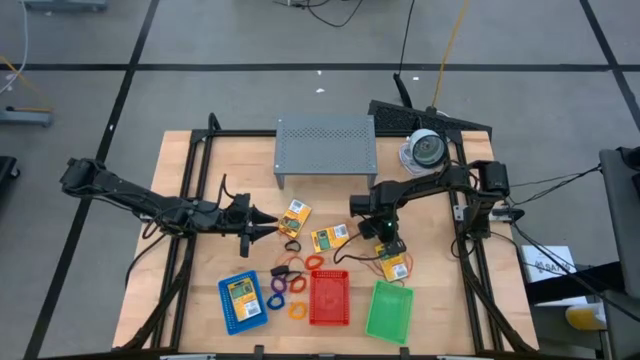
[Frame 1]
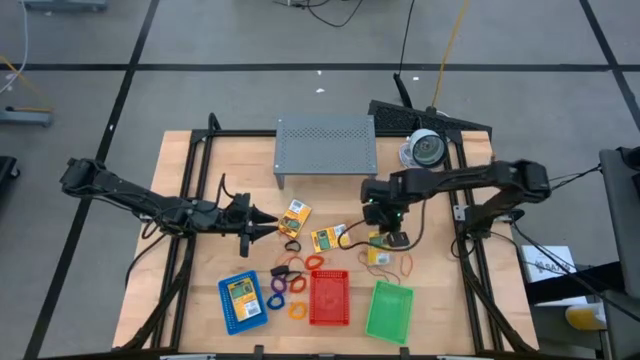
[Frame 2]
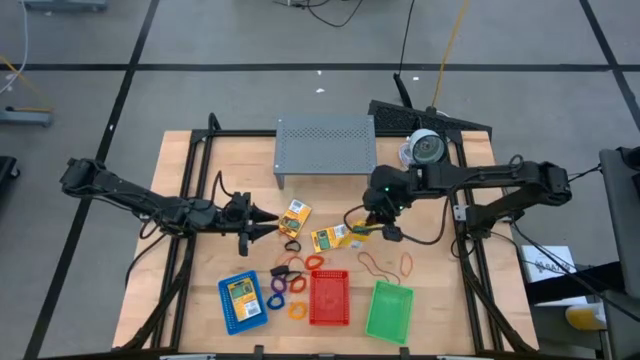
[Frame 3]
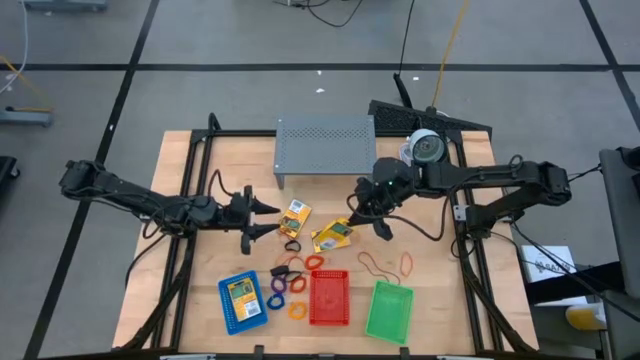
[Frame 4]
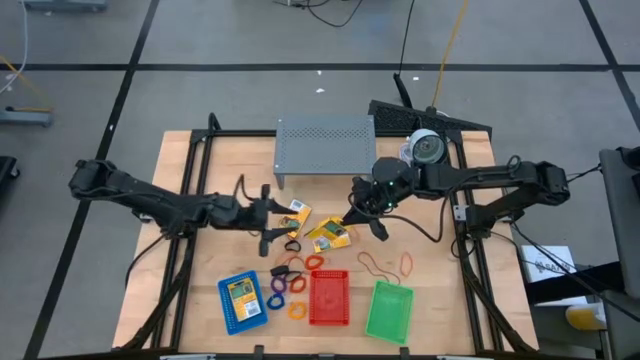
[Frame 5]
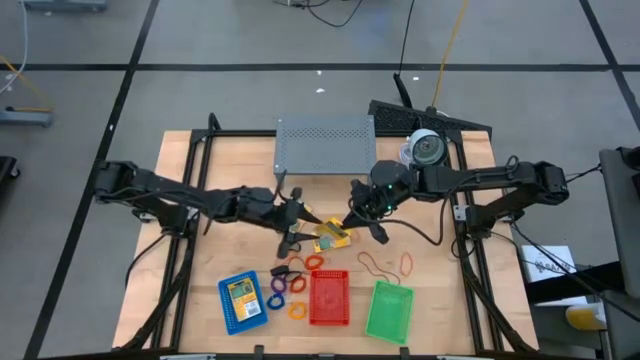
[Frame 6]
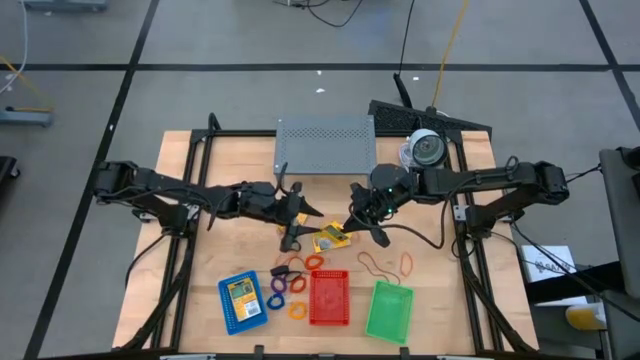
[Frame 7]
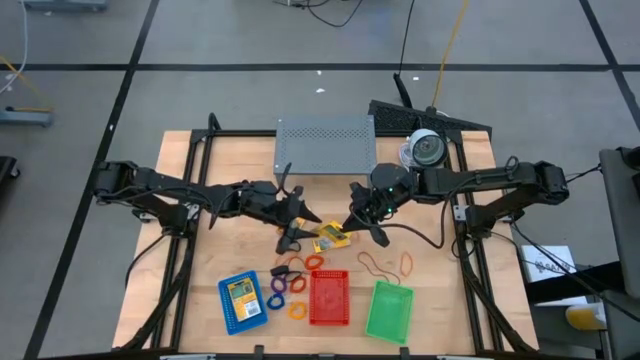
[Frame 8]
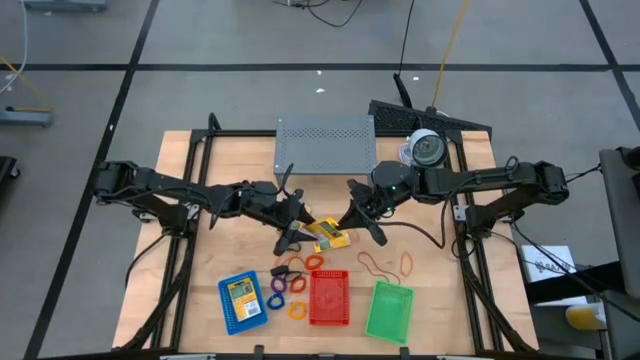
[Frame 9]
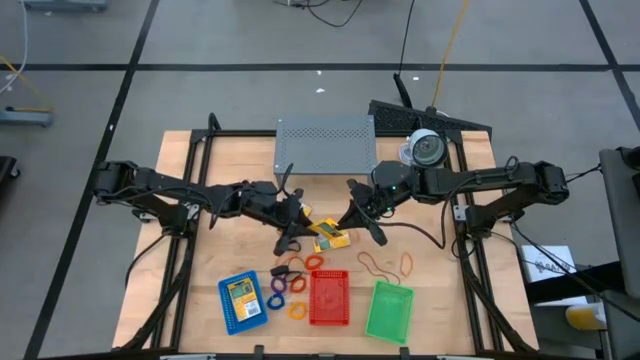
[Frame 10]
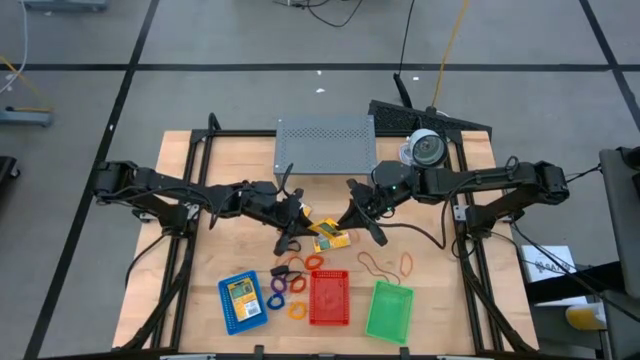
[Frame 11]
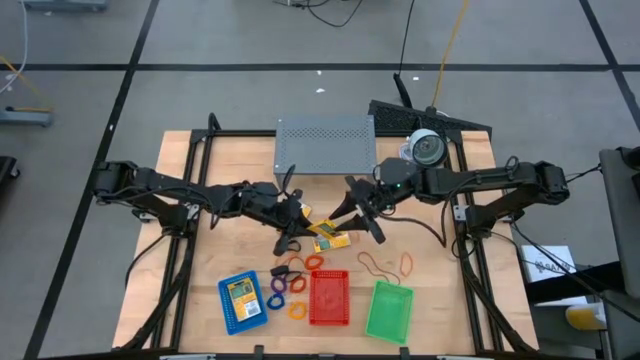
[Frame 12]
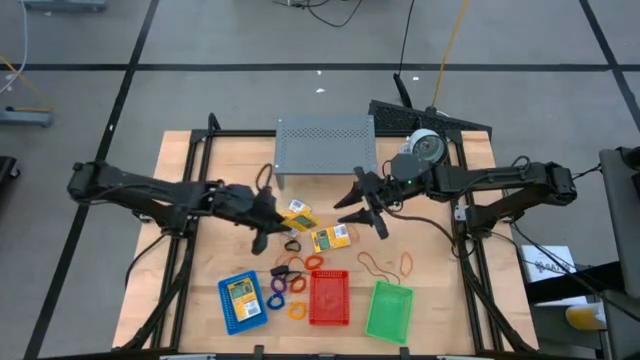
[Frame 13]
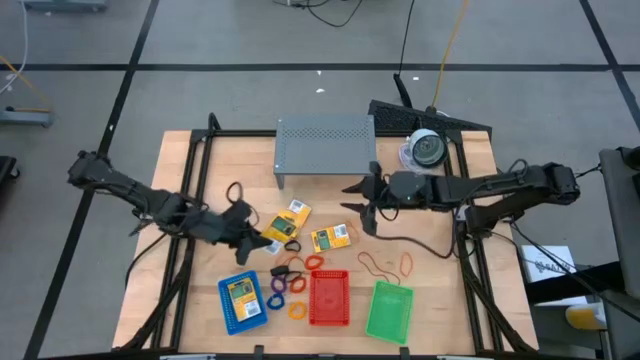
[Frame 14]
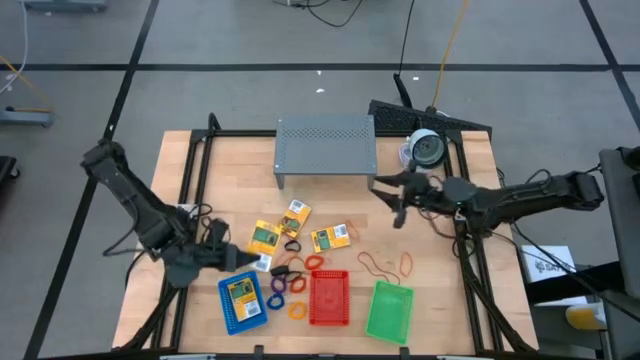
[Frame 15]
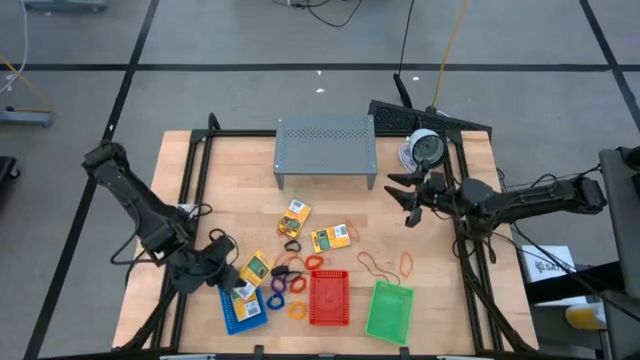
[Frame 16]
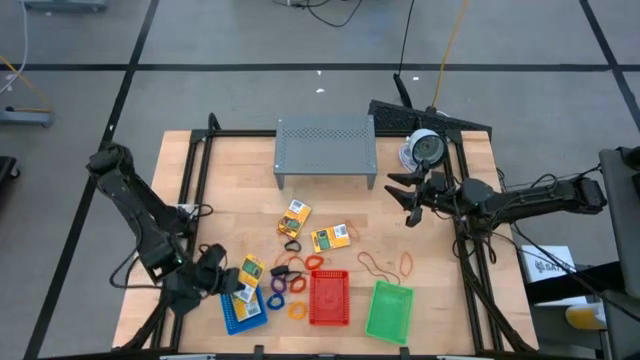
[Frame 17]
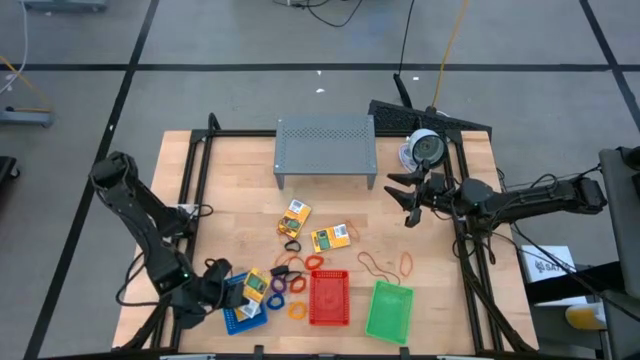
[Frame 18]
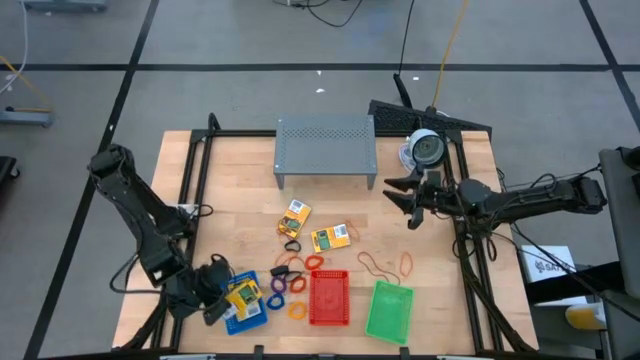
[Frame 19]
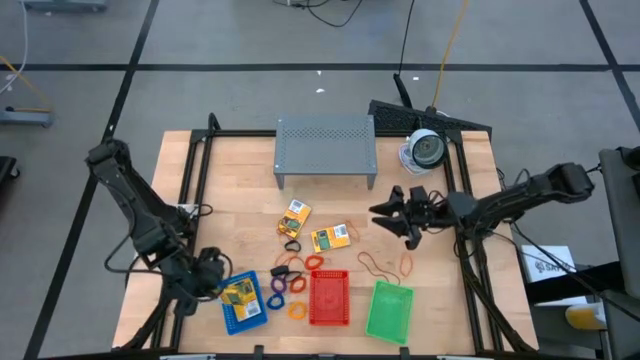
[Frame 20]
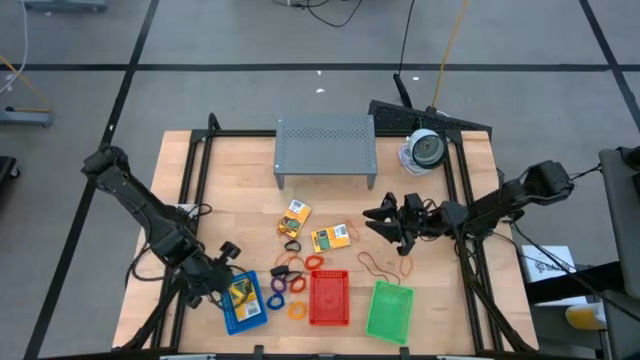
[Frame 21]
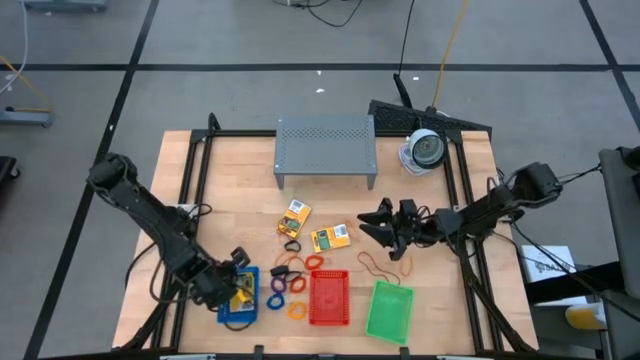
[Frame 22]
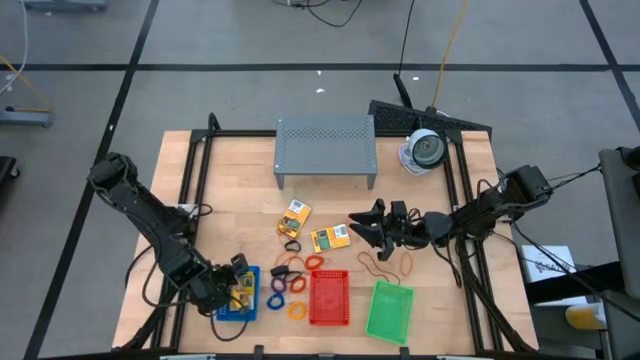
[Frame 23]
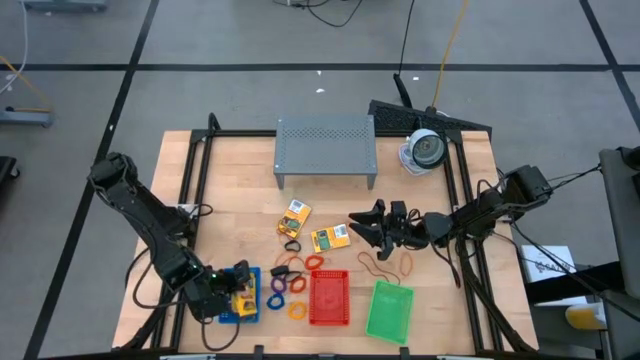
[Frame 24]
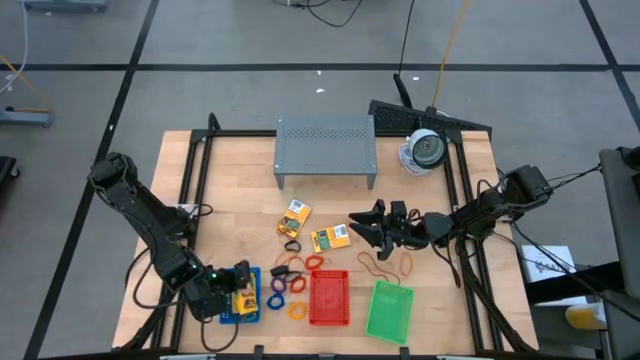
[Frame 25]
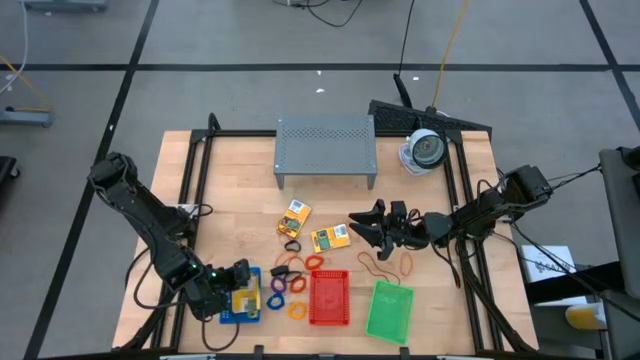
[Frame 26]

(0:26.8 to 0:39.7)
Task: Pick & Place Office Desk Supplies
Put the crayon box into the blue bin

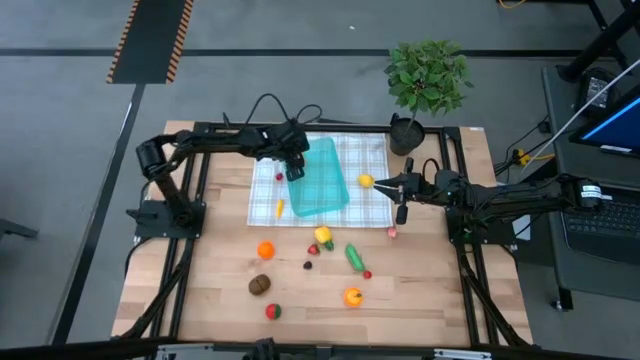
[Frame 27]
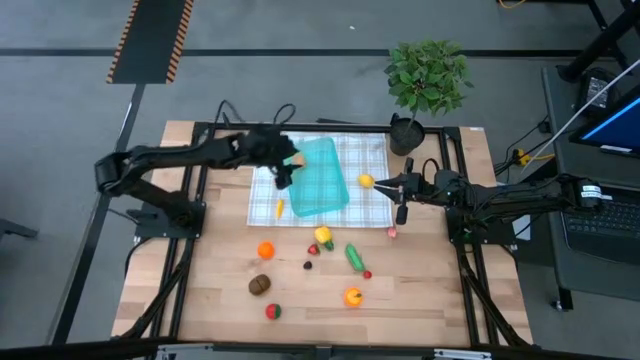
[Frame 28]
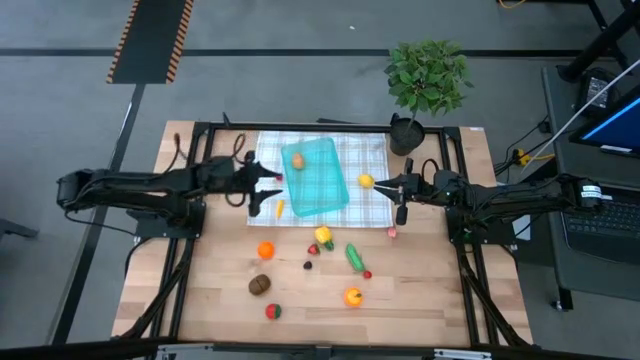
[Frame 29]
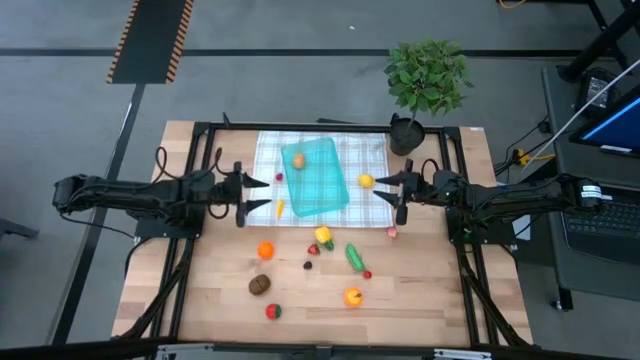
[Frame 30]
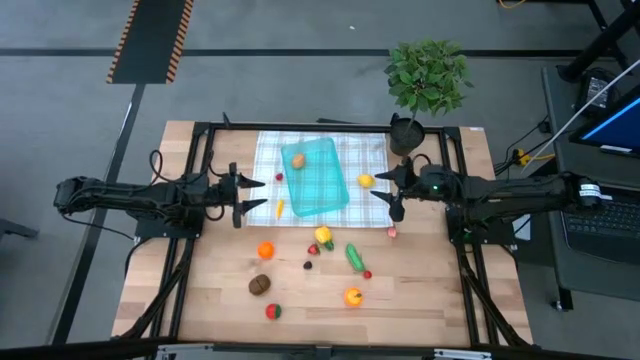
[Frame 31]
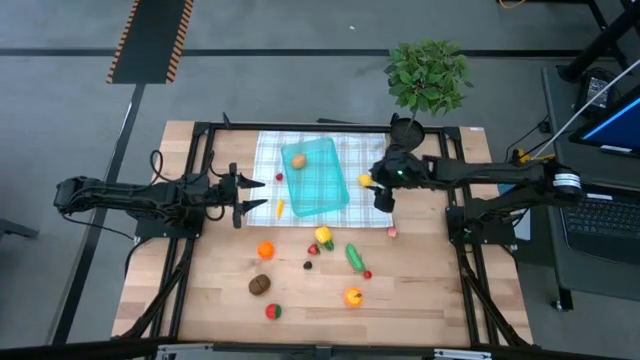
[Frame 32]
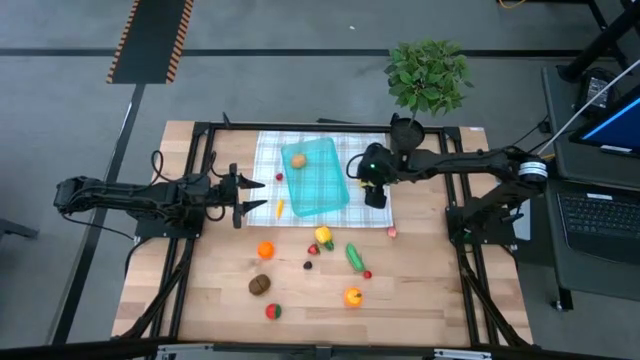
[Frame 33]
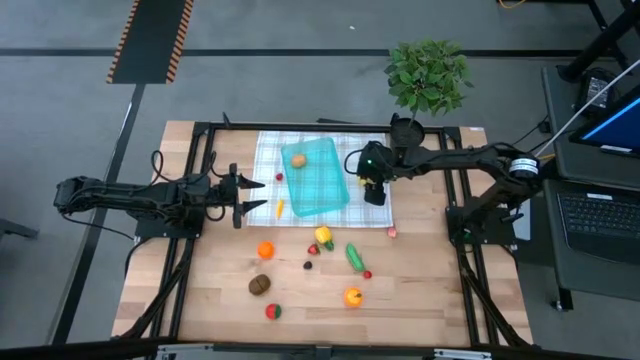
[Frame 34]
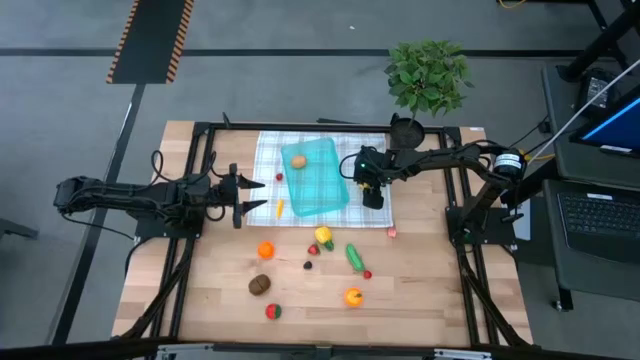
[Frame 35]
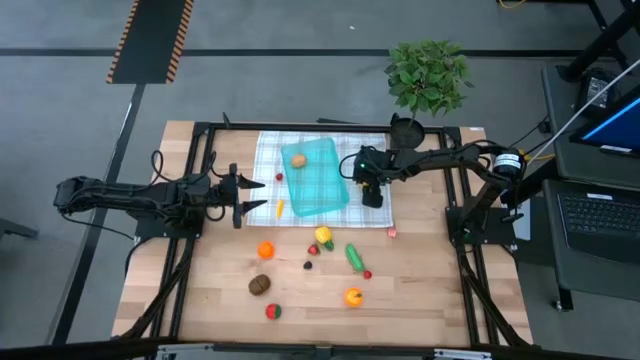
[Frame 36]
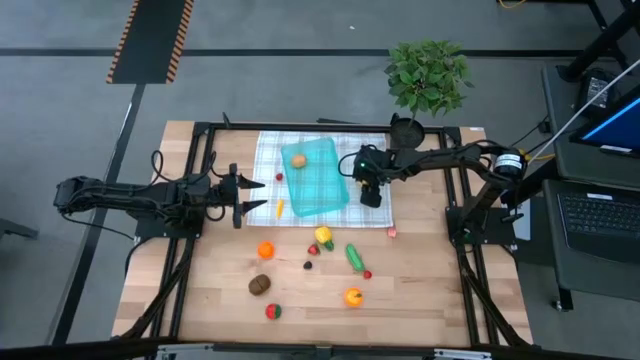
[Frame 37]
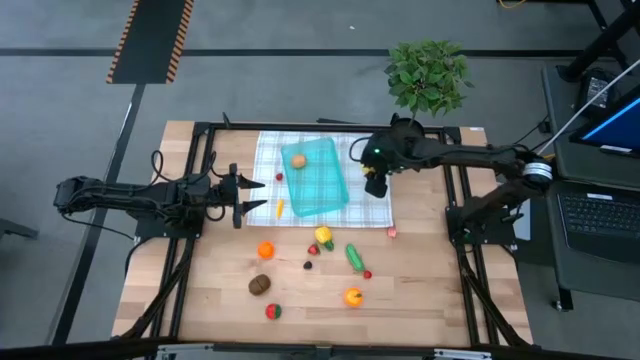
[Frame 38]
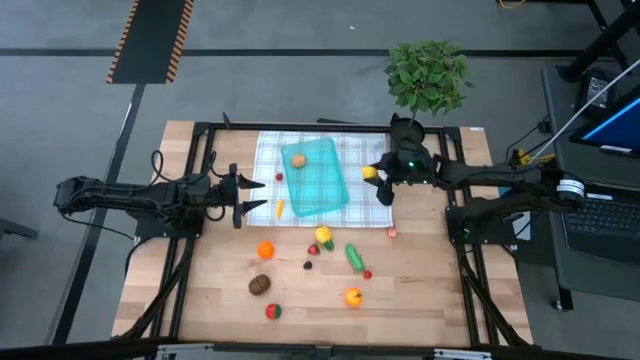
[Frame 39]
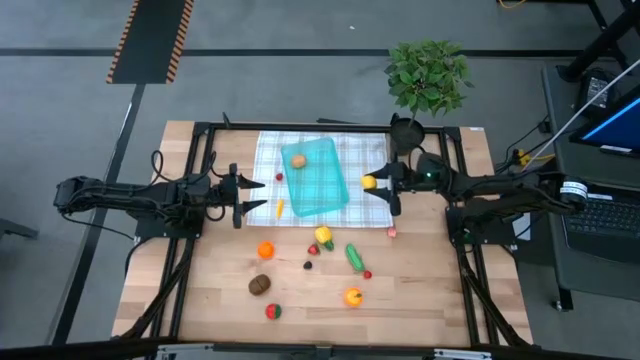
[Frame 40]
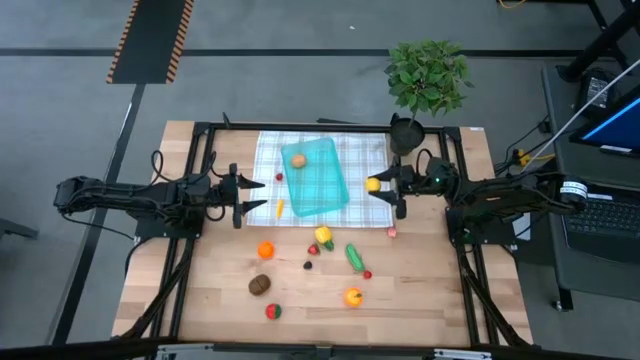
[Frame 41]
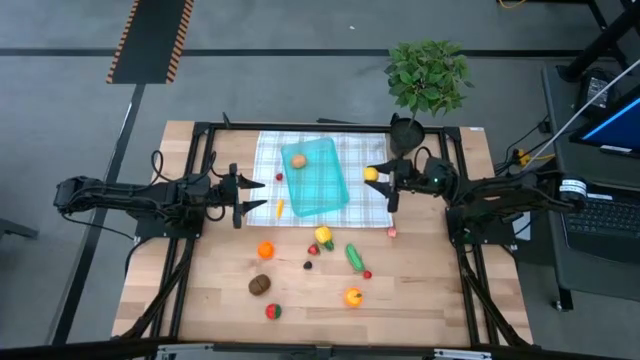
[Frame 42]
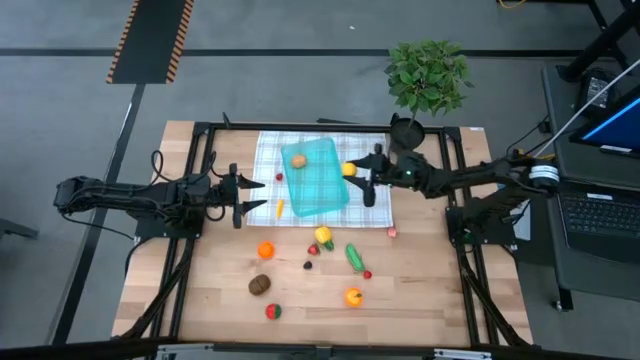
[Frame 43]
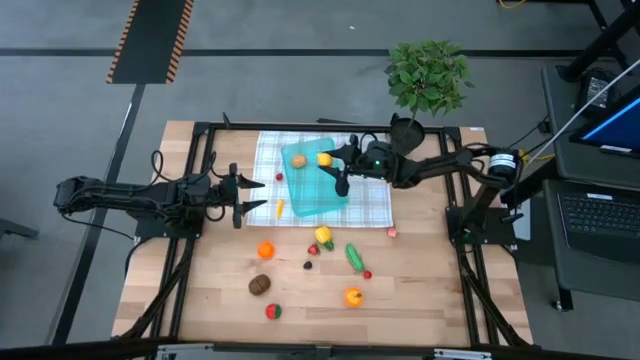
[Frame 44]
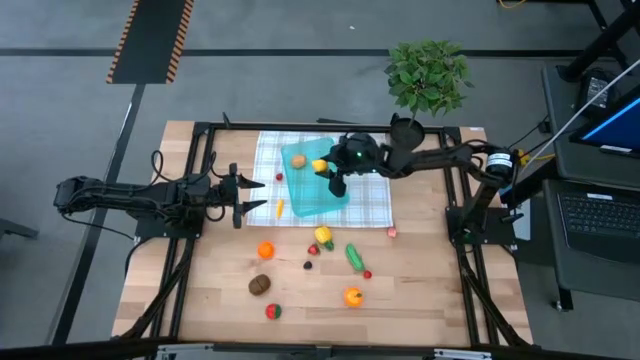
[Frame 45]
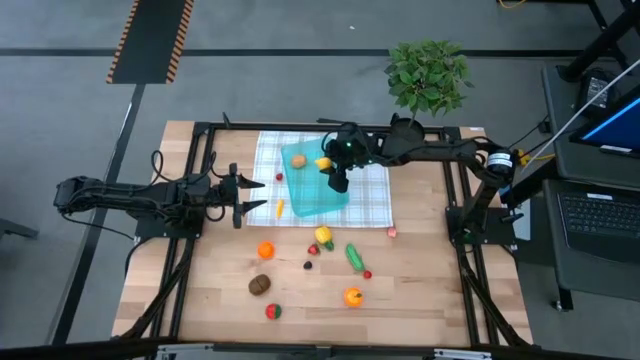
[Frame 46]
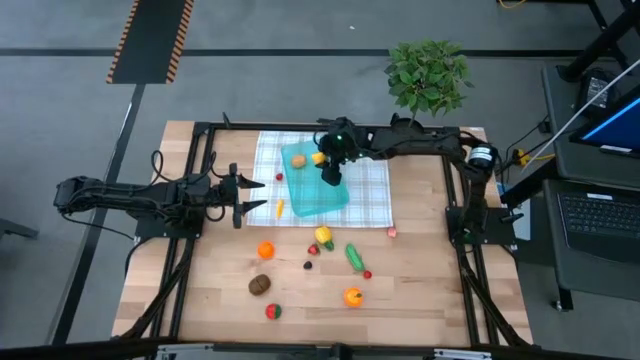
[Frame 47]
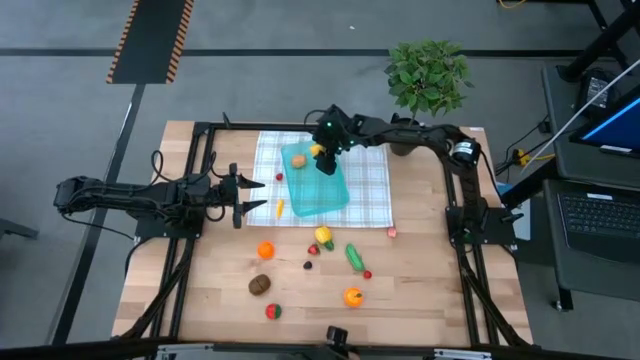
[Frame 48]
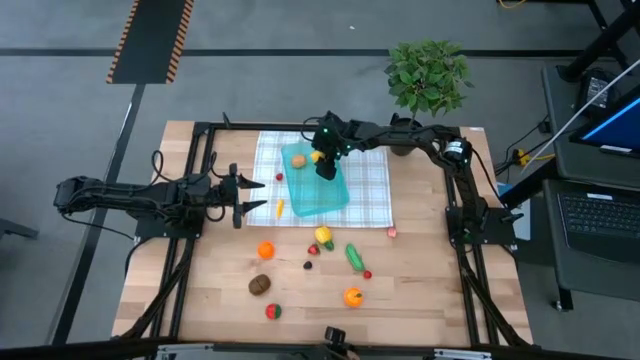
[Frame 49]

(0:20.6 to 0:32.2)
Task: Pick and placing Produce into tupperware
Put the yellow lemon into the blue bin
